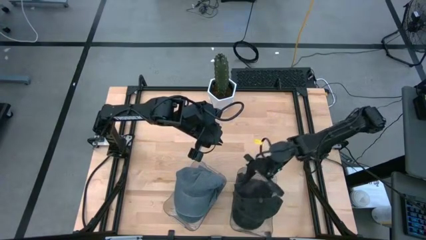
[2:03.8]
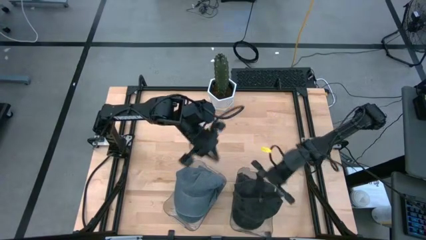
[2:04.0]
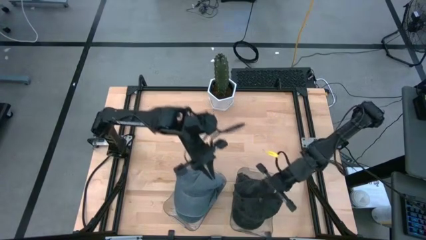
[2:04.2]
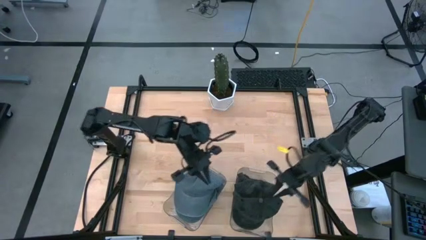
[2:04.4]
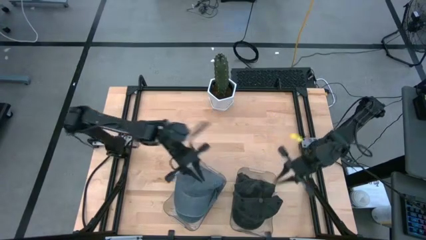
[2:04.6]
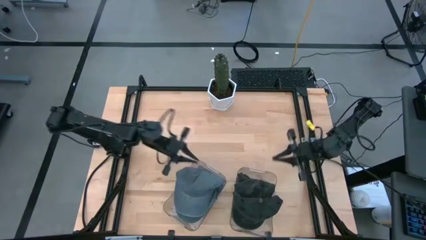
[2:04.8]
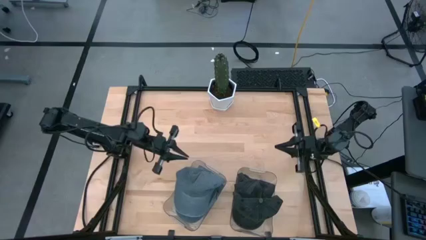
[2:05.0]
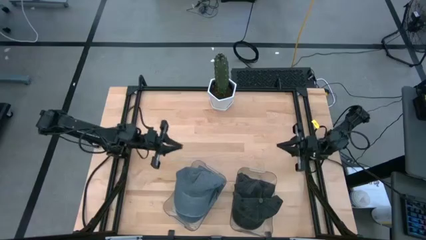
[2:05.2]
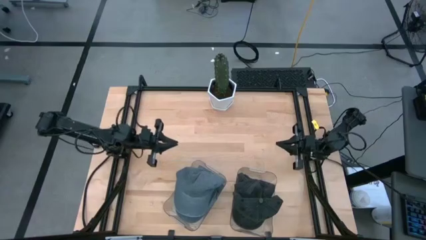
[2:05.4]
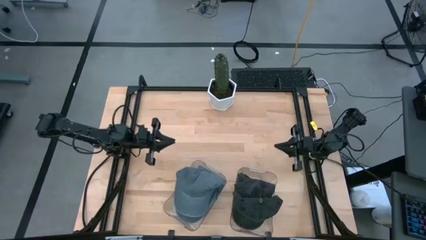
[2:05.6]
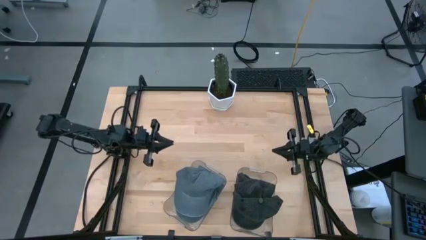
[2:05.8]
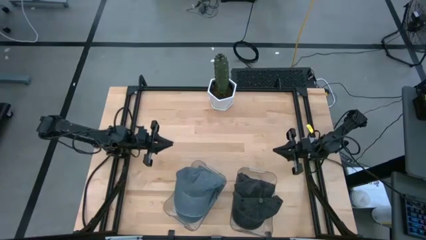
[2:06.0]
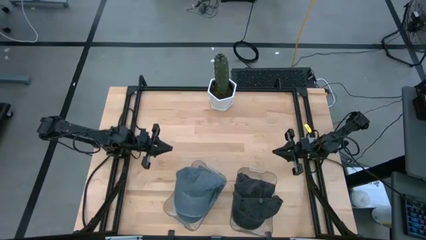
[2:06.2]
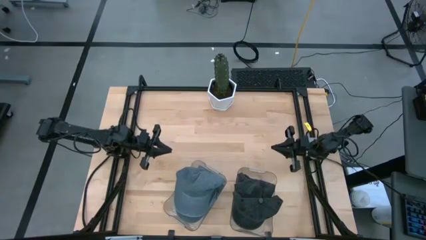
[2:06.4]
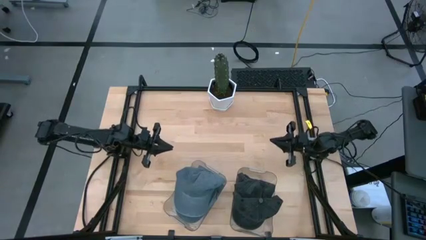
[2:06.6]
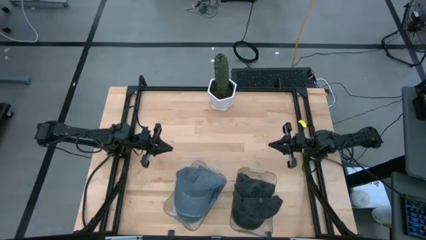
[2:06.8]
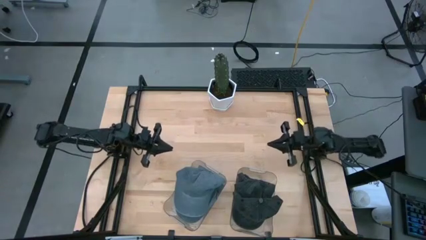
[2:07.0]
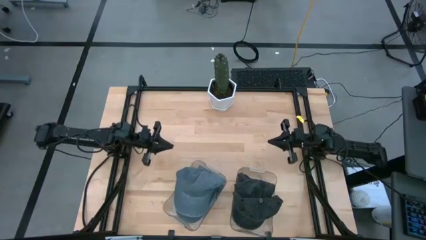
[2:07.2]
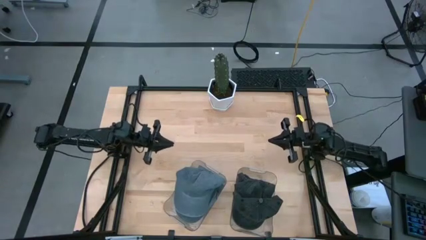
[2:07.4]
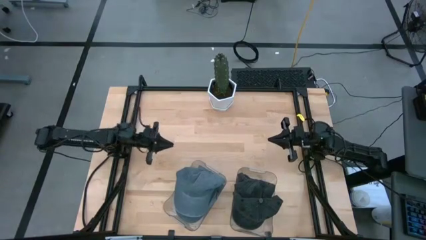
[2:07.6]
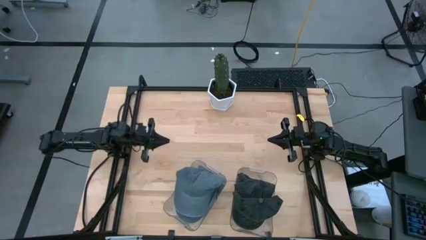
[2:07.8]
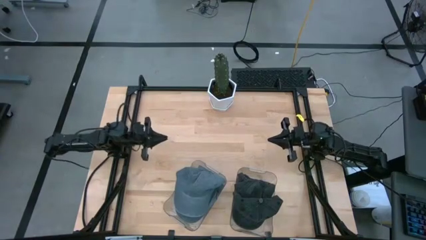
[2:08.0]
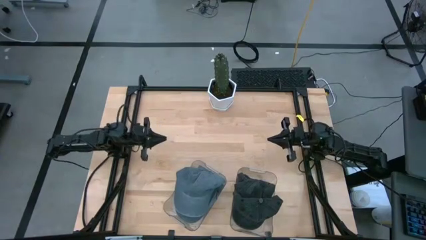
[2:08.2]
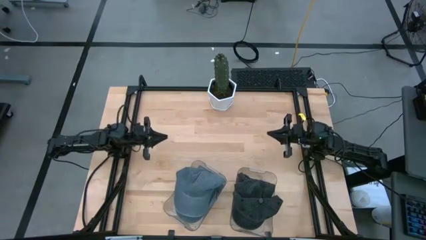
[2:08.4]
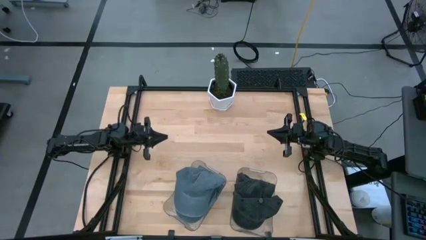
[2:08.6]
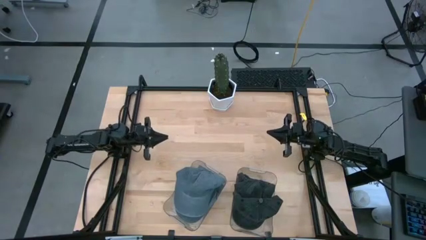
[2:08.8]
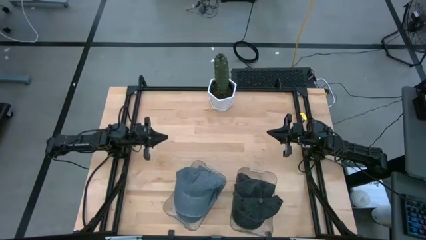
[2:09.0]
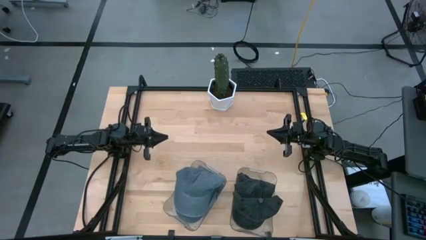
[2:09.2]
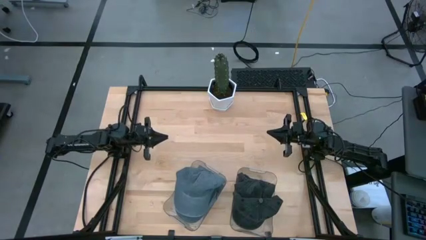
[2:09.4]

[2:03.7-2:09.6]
Task: Pick & Place hat
Return to Home Position

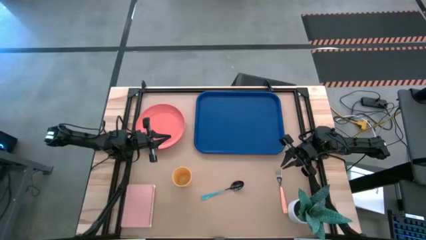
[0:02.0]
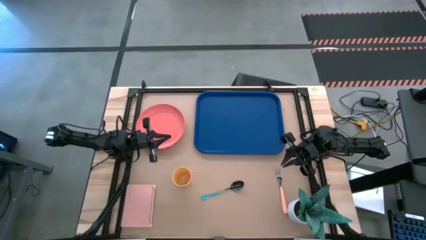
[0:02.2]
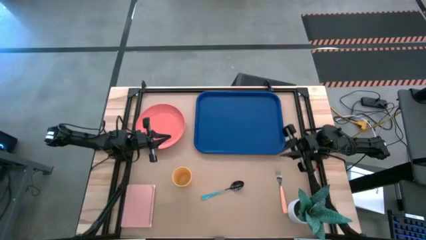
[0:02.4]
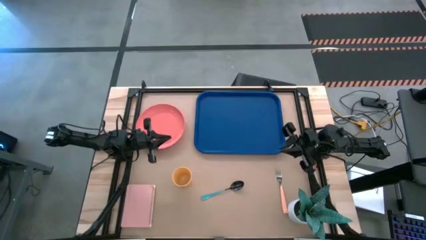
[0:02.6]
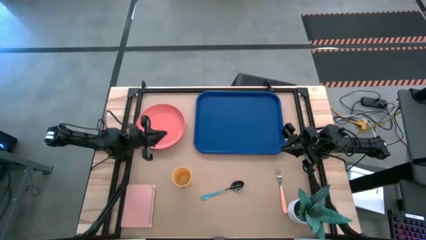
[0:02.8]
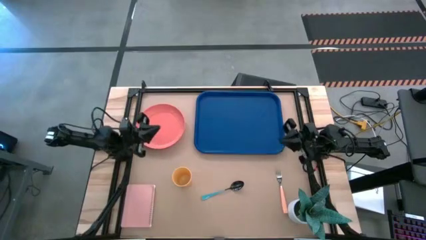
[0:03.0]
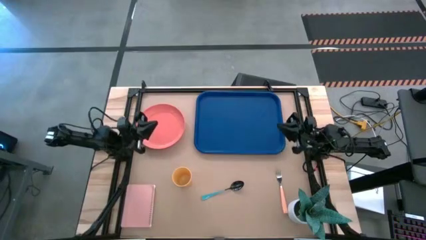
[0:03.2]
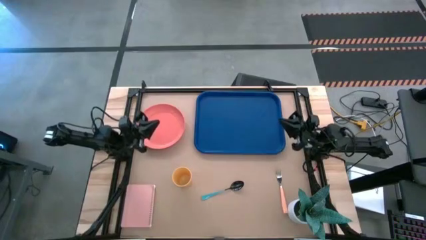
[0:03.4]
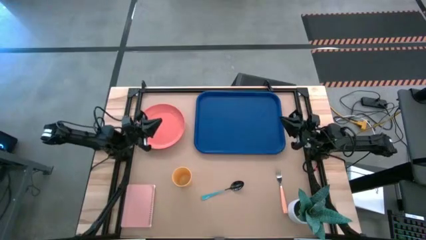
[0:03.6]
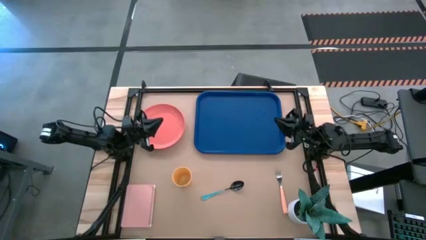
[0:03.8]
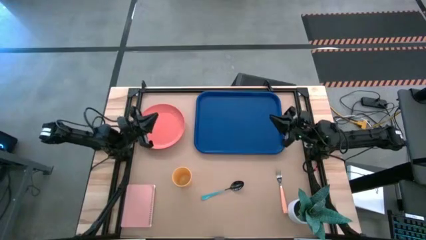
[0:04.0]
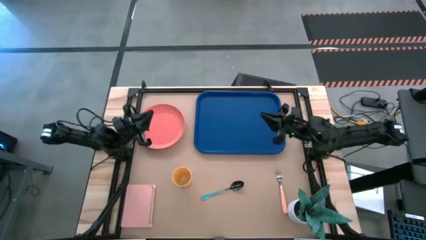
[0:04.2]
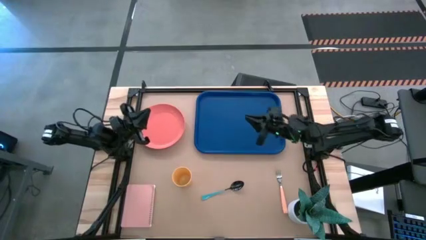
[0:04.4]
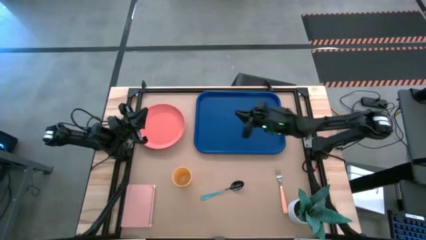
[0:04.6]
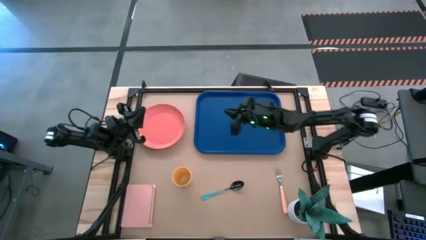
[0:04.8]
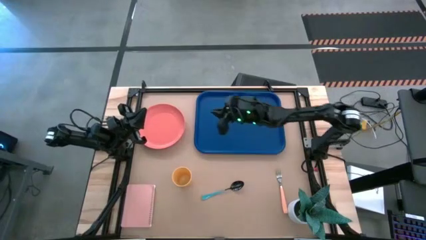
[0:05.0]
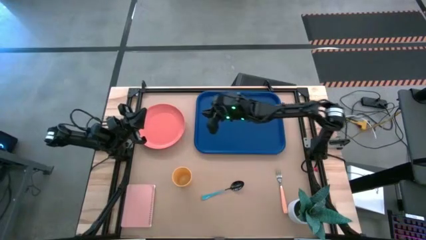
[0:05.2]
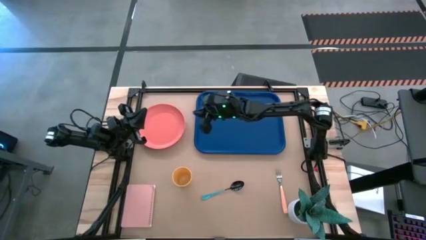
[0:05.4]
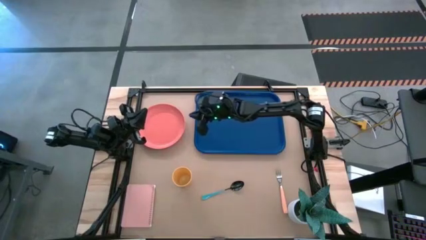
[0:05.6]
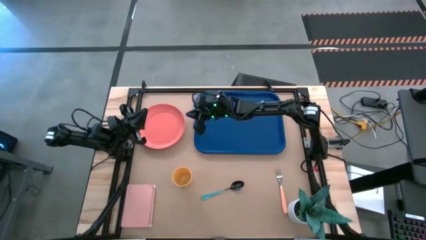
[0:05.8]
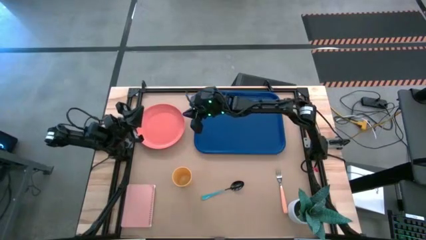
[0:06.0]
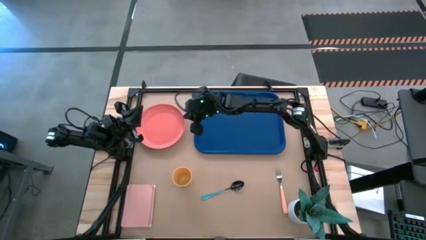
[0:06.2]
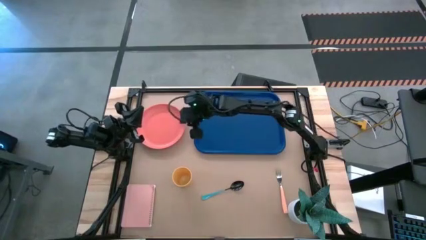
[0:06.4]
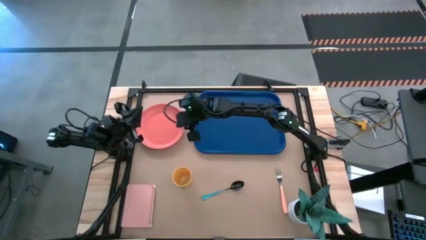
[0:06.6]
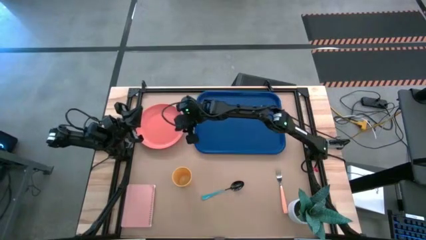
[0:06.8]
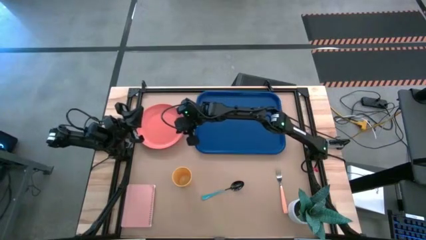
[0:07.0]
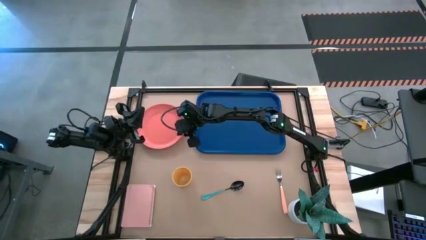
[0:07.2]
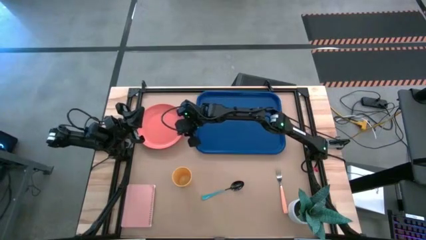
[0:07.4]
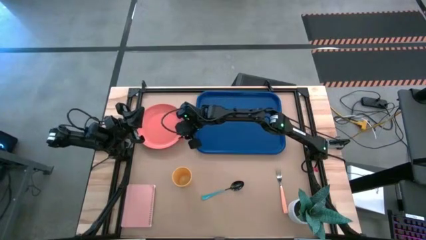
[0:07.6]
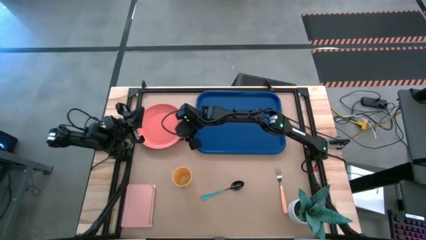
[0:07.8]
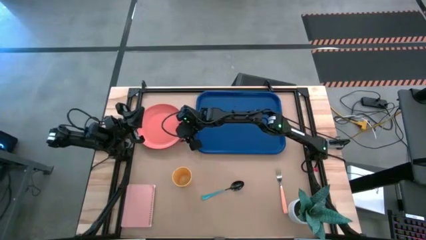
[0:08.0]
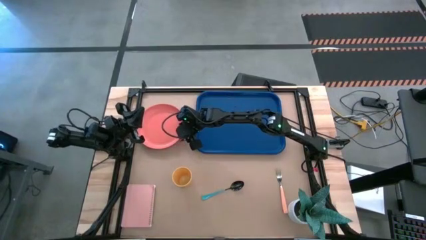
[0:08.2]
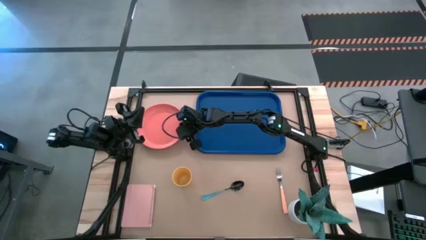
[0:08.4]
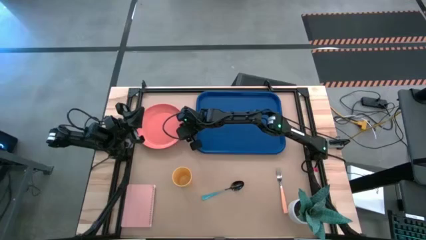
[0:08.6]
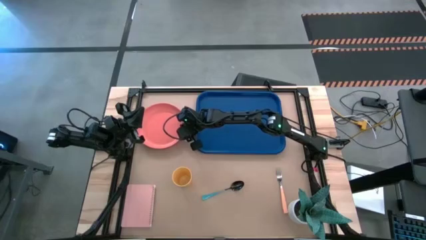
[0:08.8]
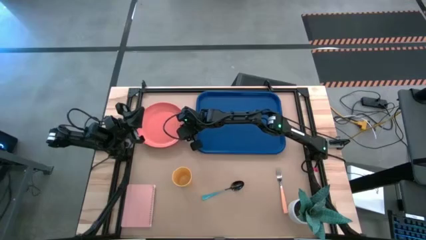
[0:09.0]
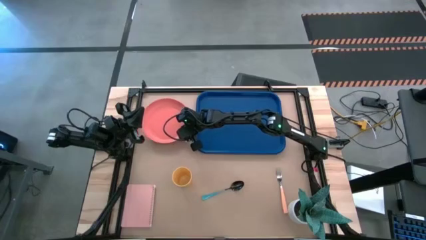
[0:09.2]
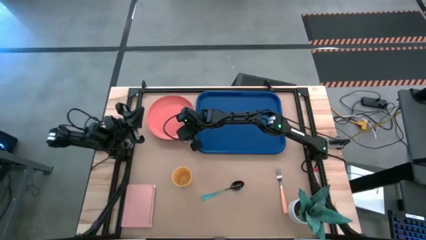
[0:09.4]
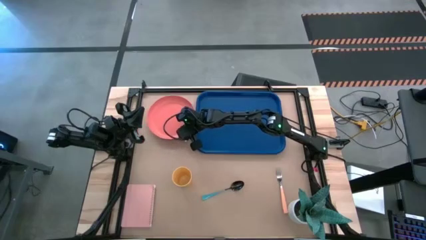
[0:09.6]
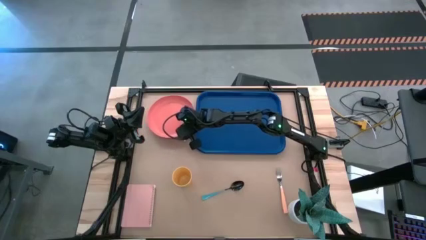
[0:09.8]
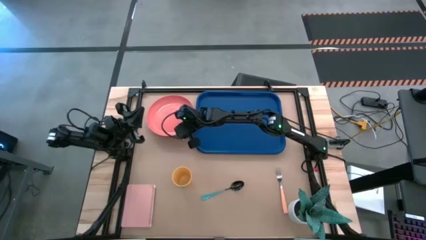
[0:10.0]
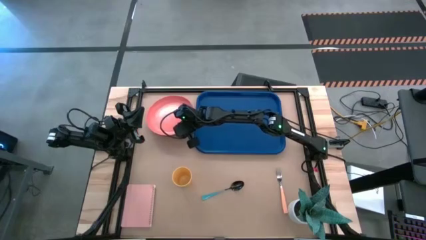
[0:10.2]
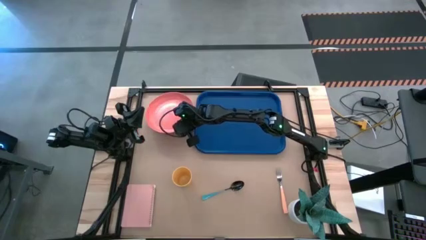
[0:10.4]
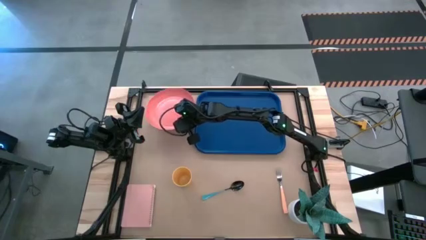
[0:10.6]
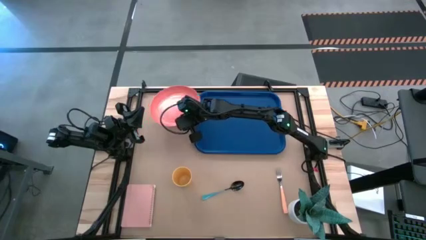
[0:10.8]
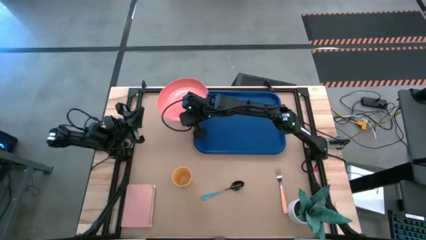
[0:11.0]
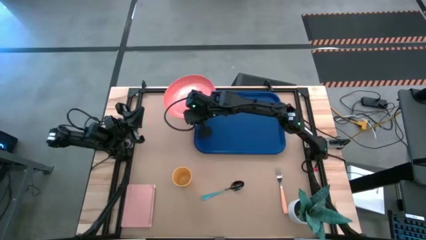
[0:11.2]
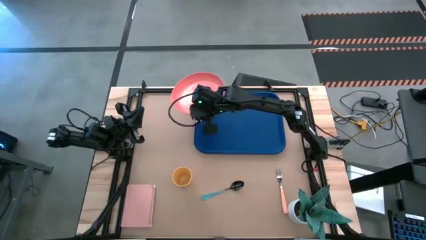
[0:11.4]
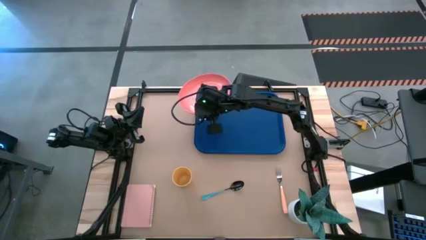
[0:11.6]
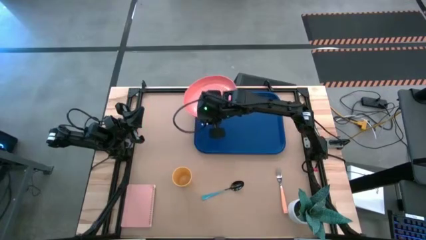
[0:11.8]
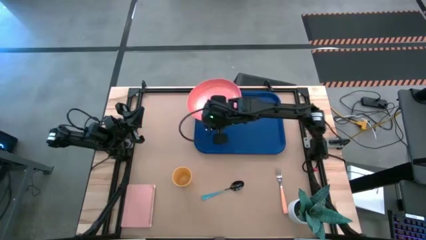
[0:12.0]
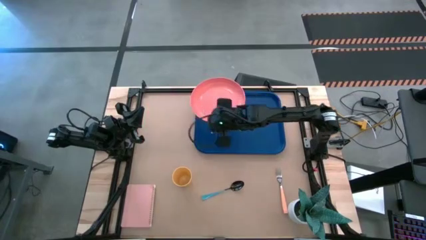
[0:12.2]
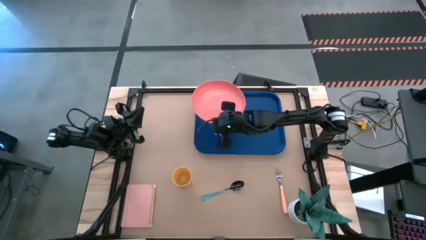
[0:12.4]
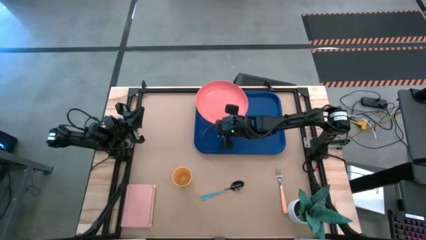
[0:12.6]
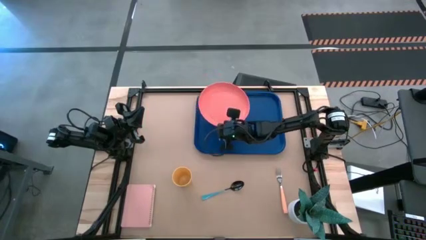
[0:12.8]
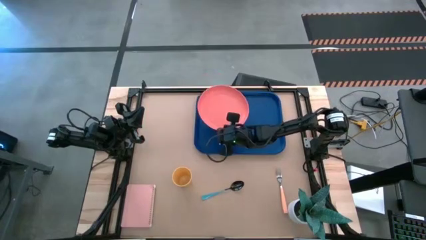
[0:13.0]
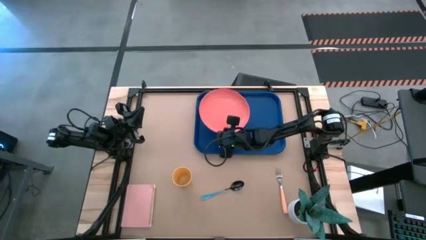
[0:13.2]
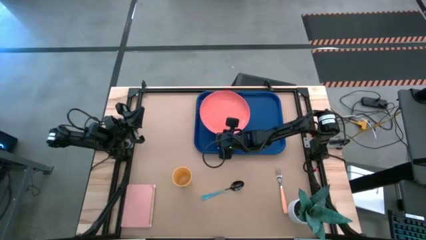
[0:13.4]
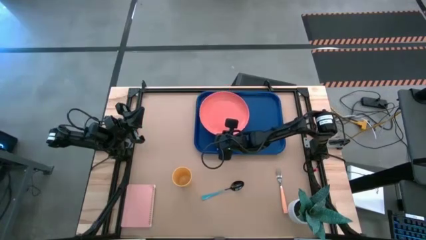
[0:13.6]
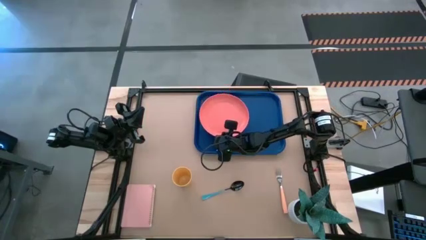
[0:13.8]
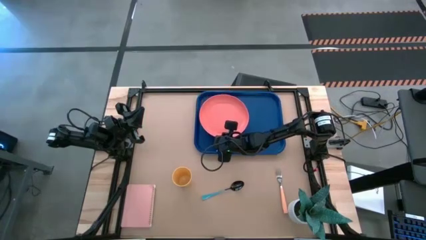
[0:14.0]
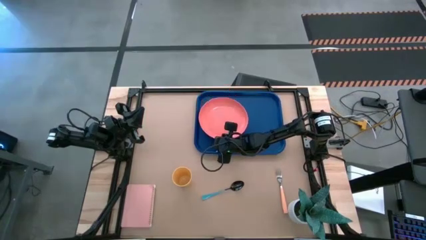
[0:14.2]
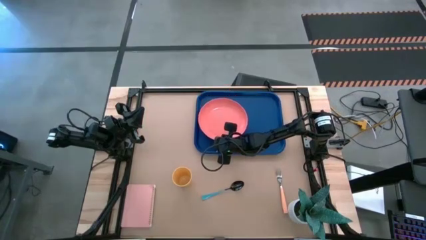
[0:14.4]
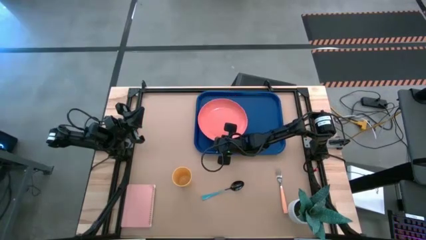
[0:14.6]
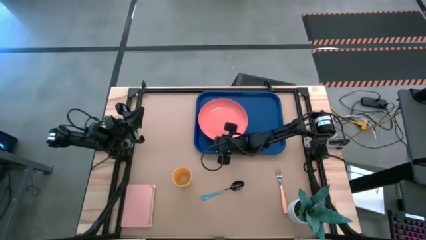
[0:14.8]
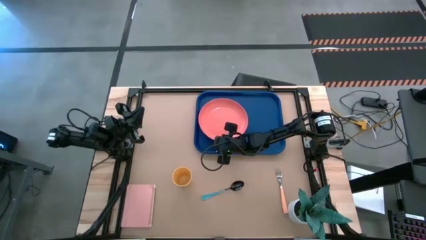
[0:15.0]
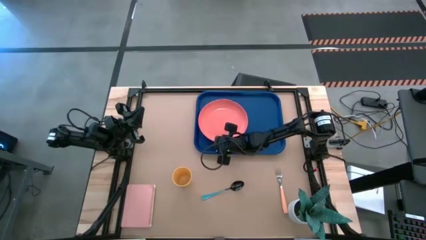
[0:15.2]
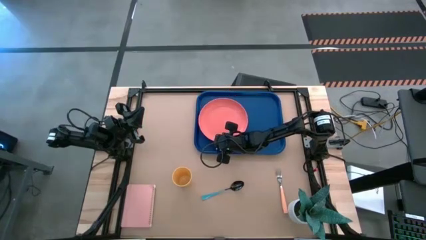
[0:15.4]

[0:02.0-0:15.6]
Task: Pick and place plate/cup/fork/spoon on tray
Put the orange plate on the left of the blue serving tray
